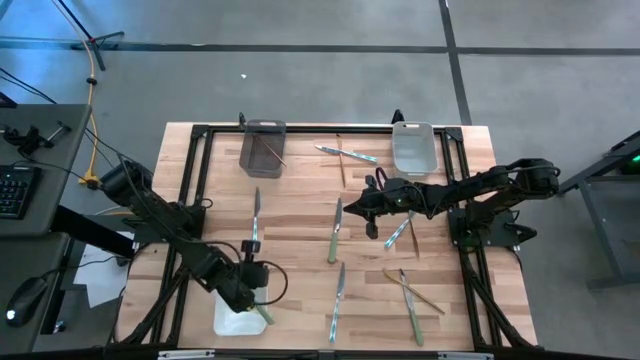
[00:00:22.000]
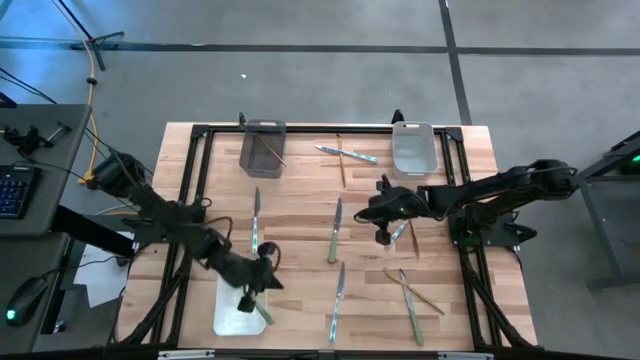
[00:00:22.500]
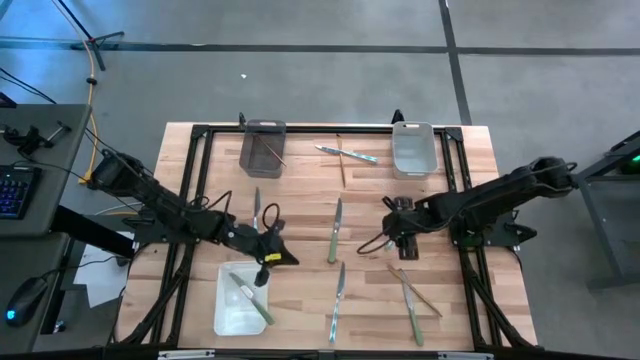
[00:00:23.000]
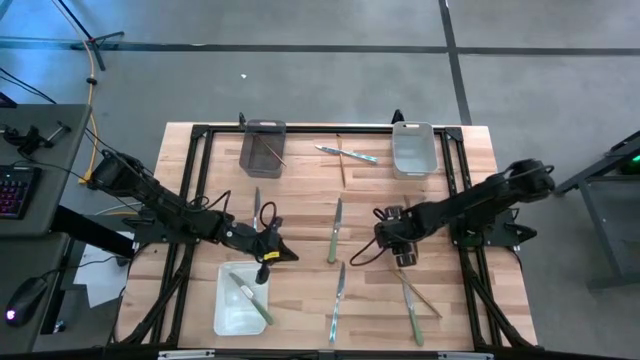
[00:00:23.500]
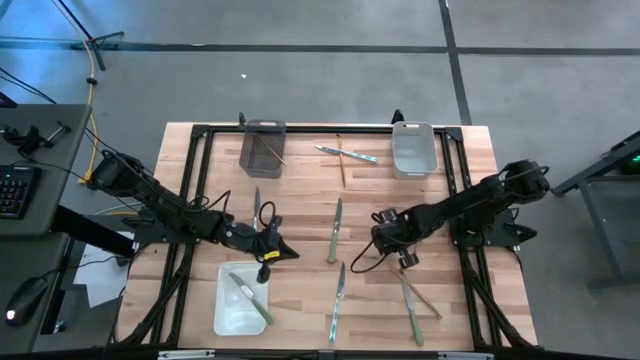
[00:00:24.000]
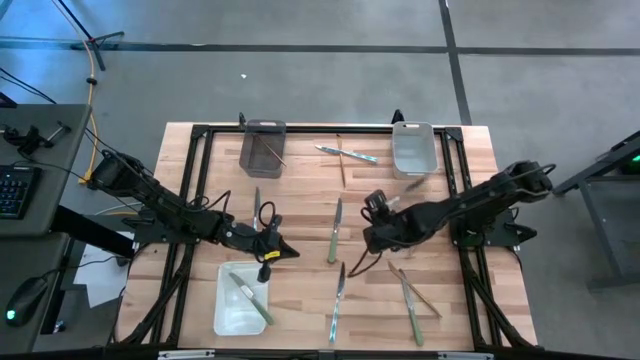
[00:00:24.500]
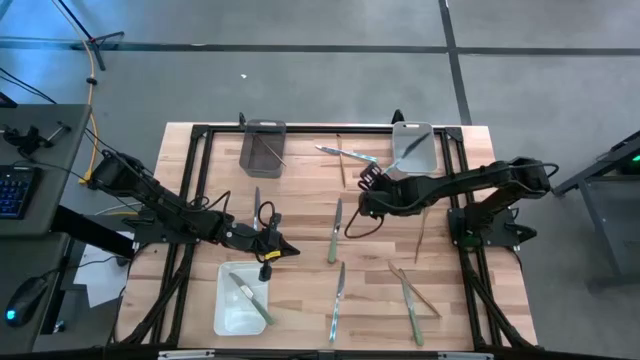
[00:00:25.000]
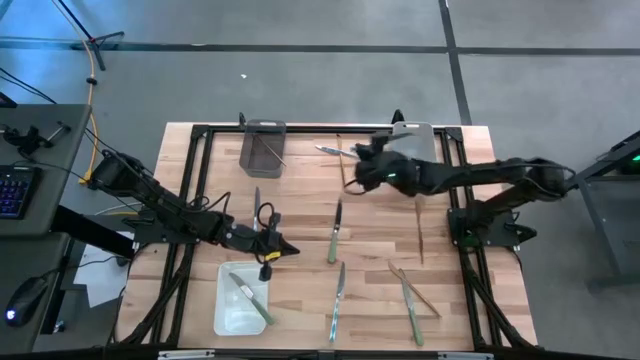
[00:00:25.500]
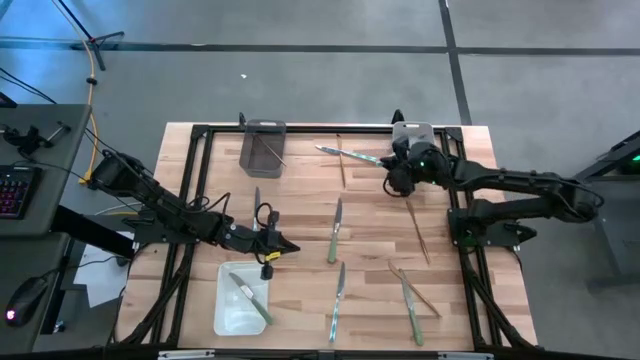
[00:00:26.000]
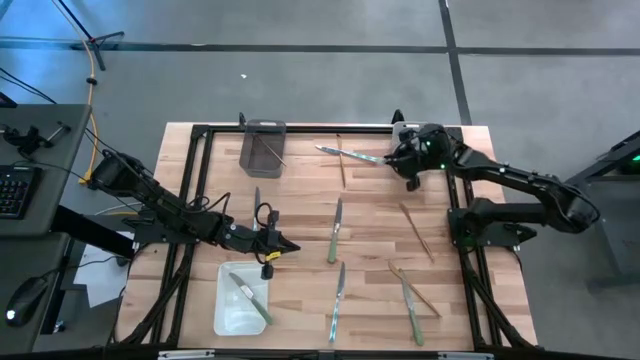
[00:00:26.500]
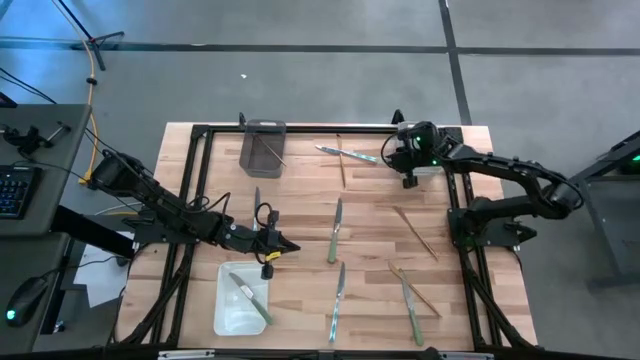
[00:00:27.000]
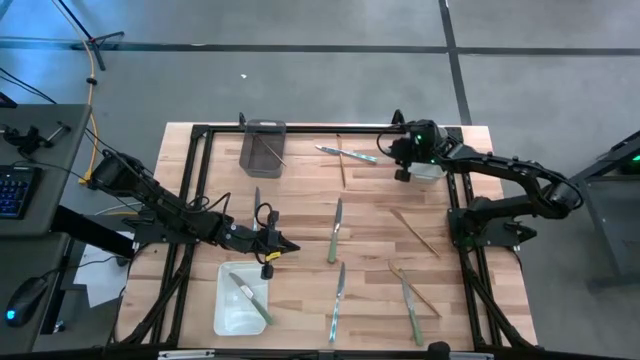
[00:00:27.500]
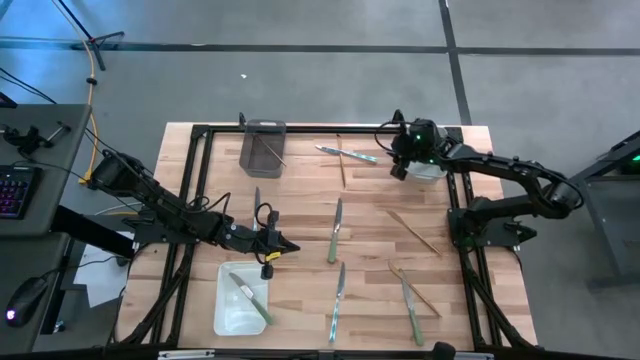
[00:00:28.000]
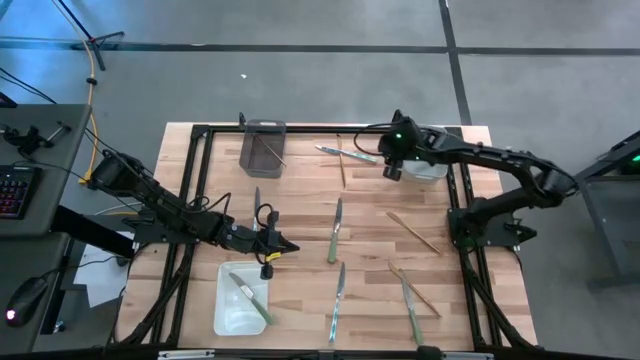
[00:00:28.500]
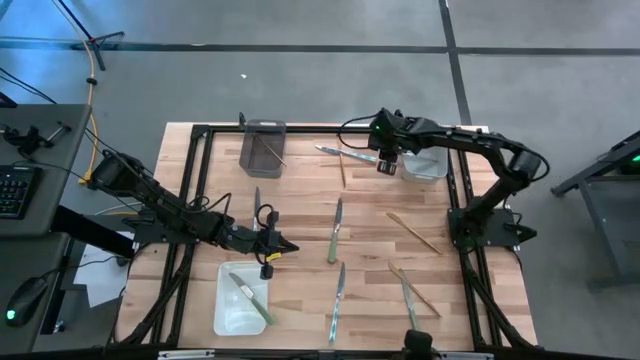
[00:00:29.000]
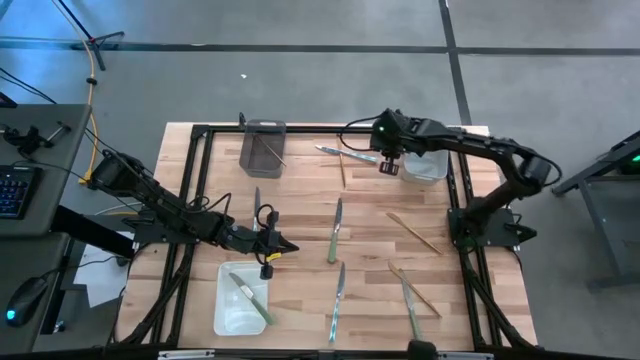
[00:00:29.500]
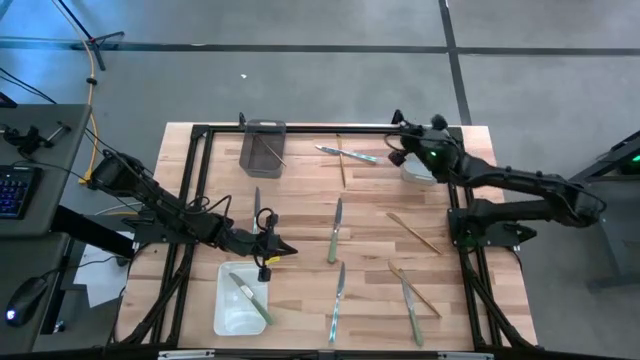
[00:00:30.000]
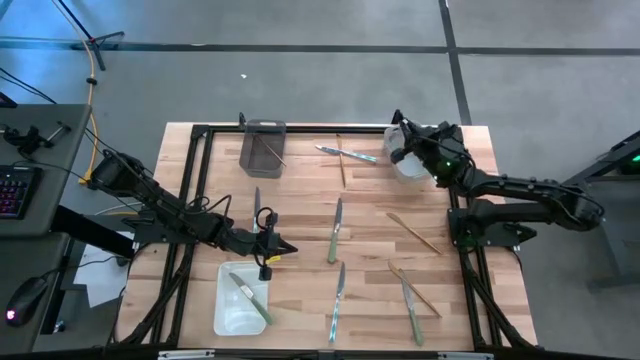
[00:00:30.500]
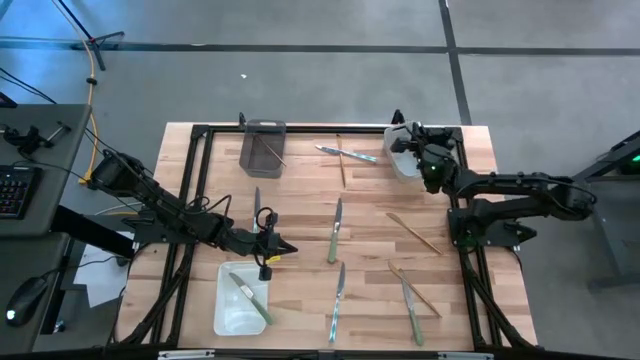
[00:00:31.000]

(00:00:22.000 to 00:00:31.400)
Task: Sort silverware by color (type)
Put the blue table knife into the gray bin

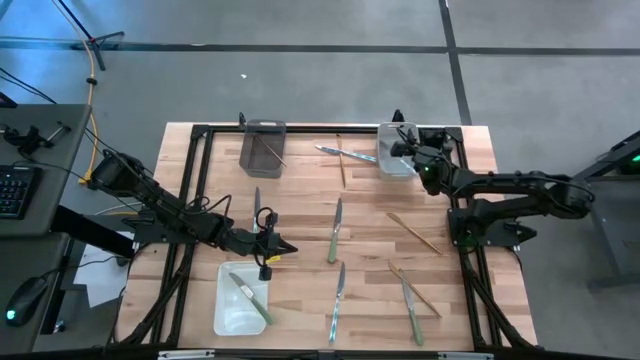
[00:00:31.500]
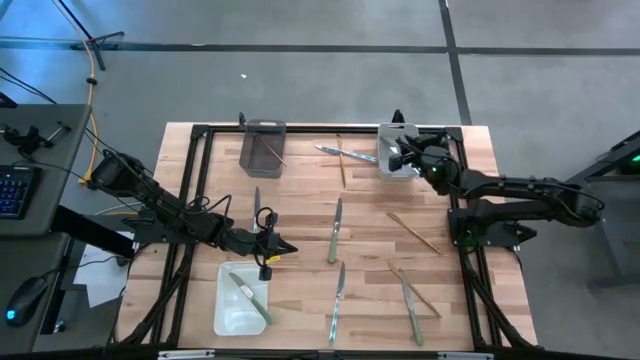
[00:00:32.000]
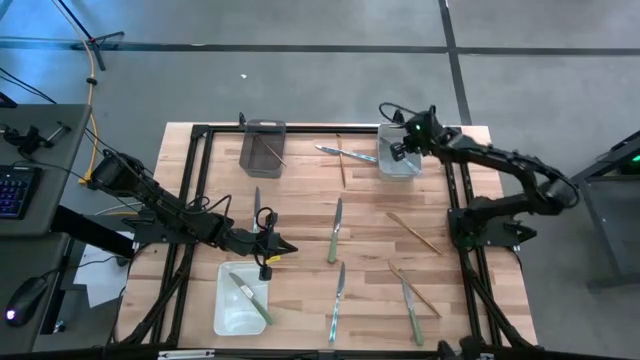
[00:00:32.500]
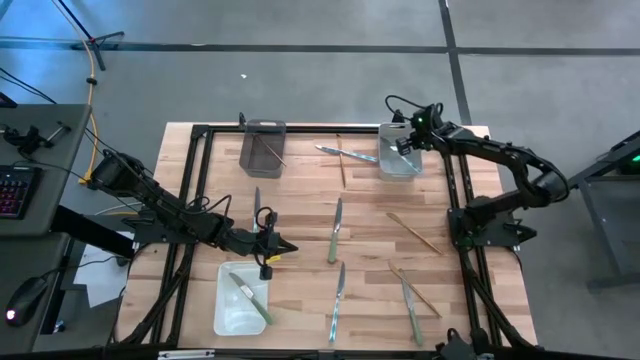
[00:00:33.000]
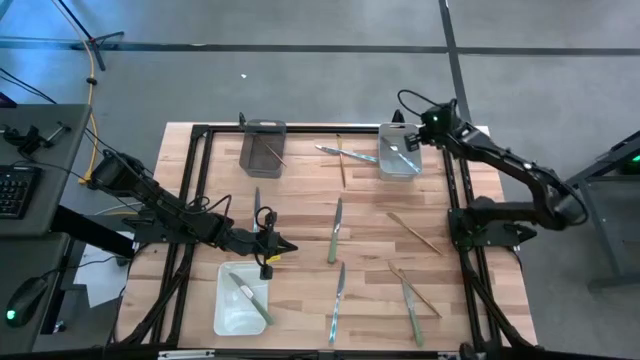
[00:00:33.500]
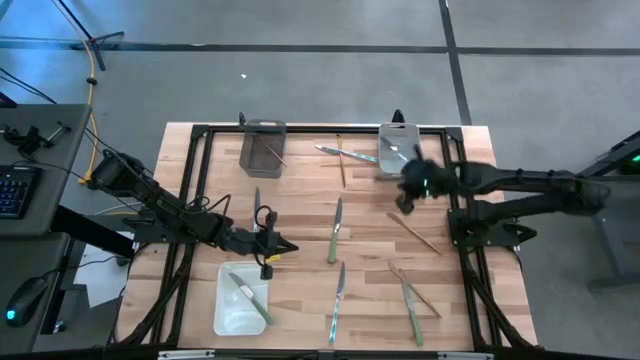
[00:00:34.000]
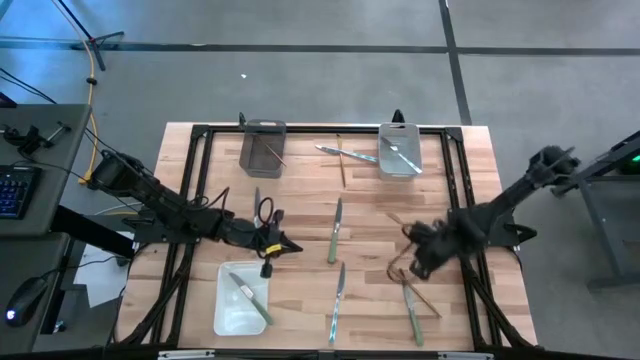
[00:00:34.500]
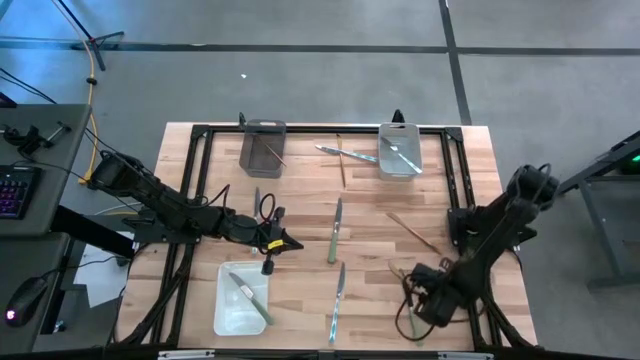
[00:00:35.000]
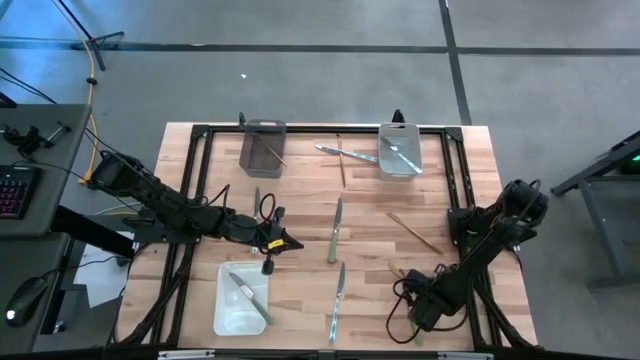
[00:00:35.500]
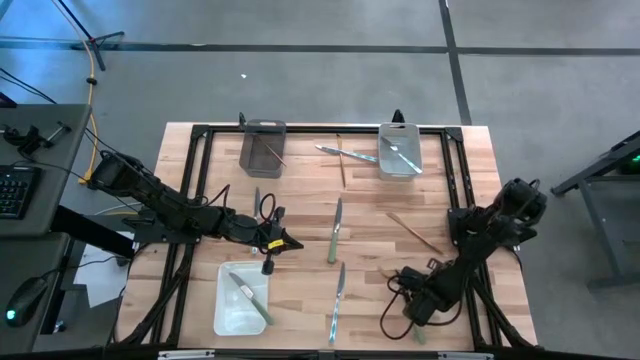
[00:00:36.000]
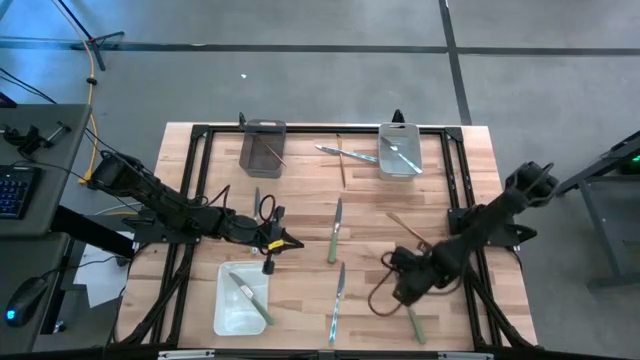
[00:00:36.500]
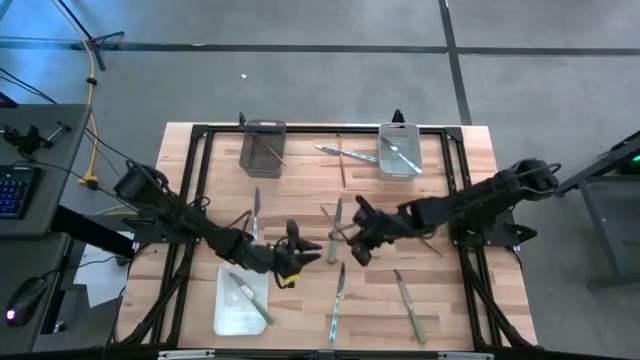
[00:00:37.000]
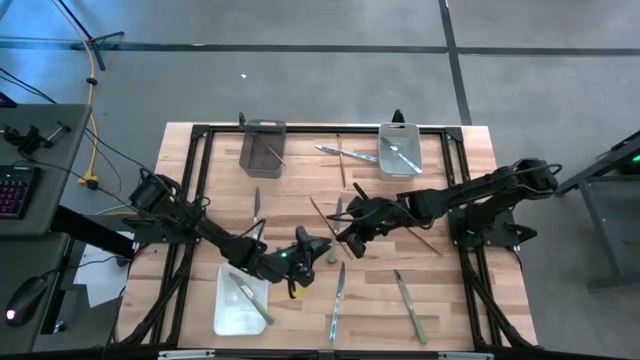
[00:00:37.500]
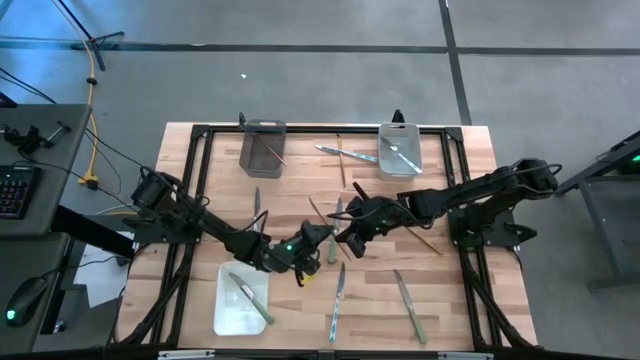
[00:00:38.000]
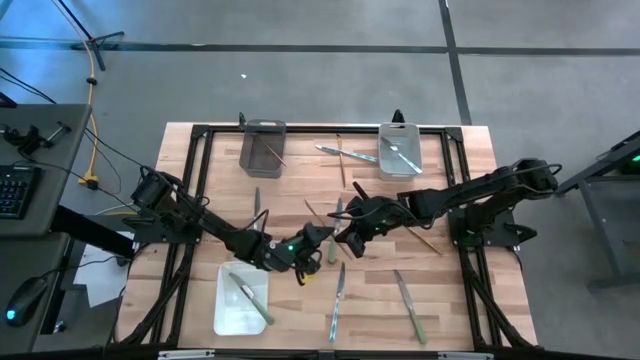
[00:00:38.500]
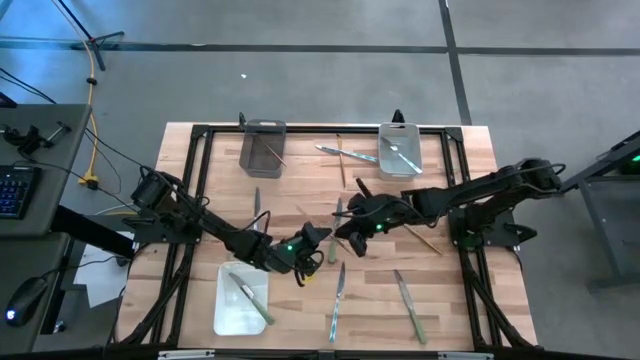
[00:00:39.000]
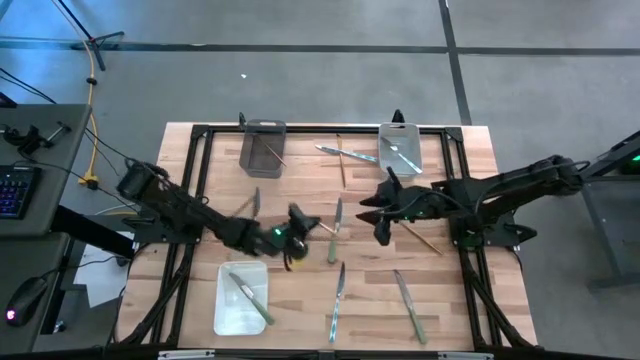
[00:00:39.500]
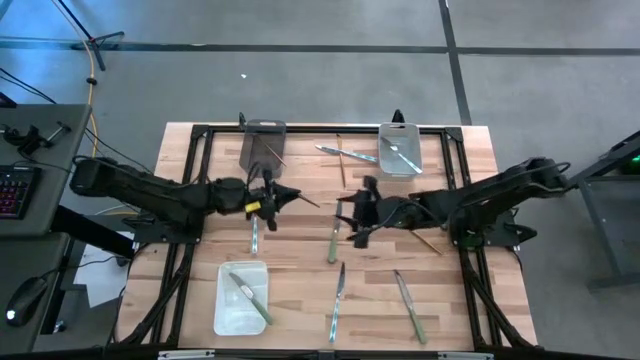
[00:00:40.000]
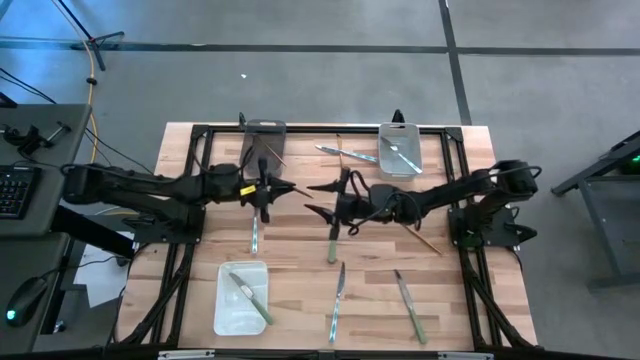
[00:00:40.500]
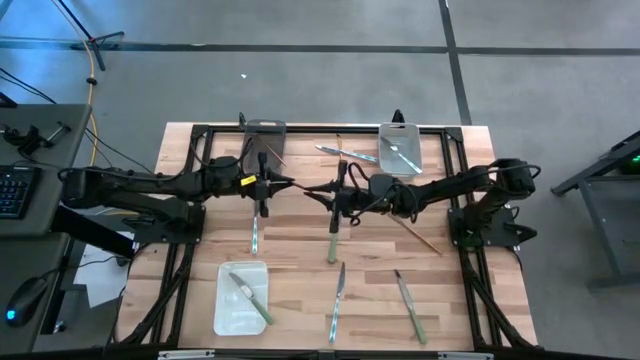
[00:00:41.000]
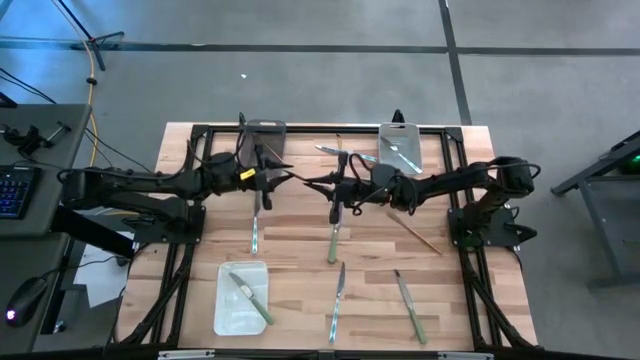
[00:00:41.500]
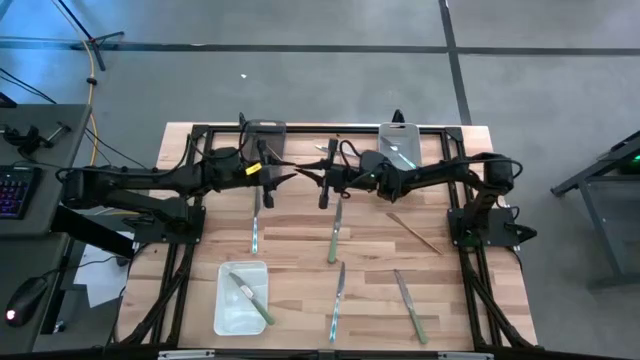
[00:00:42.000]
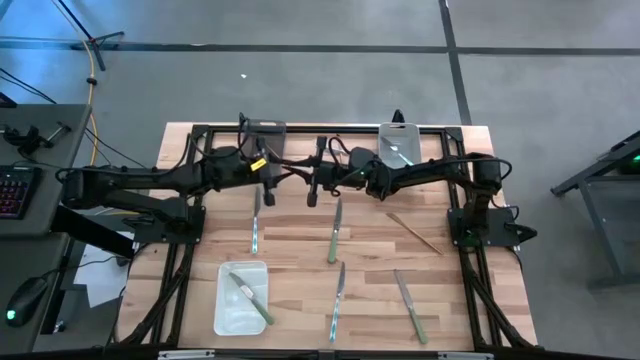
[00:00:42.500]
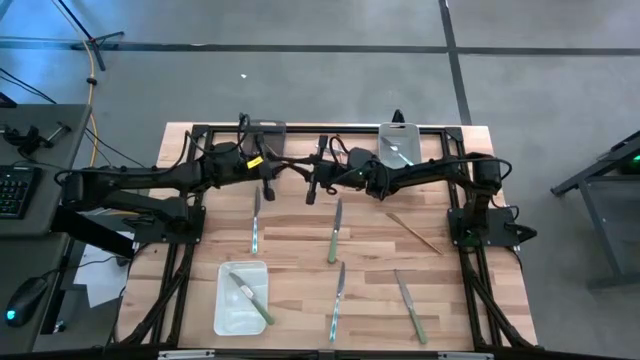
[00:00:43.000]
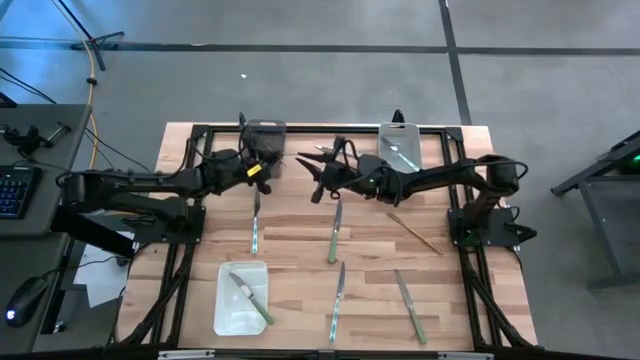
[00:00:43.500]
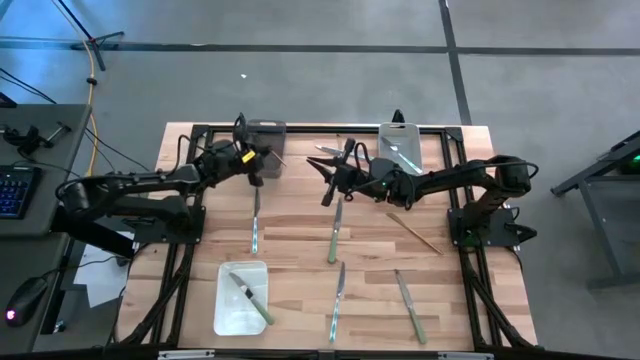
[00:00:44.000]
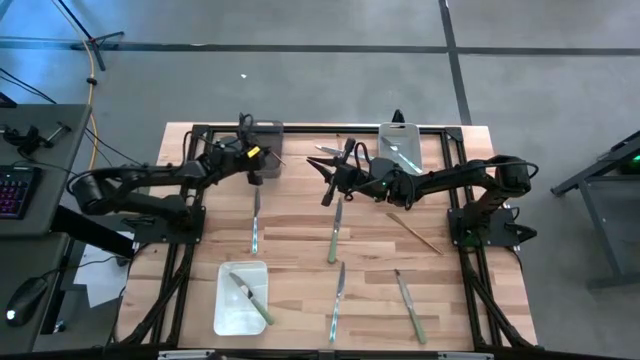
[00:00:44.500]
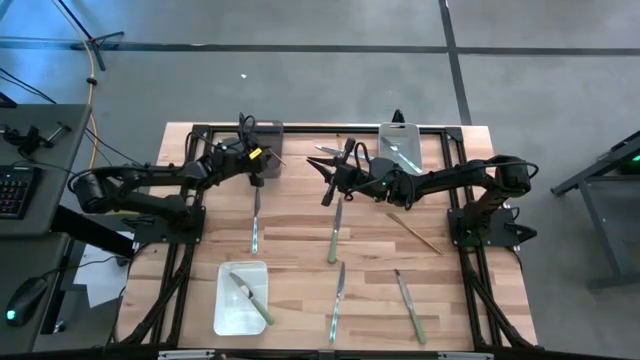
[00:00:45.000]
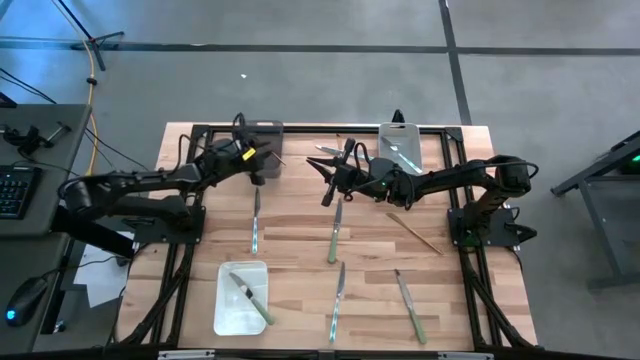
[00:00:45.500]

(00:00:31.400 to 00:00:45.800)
Put the gold table knife into the black bin
